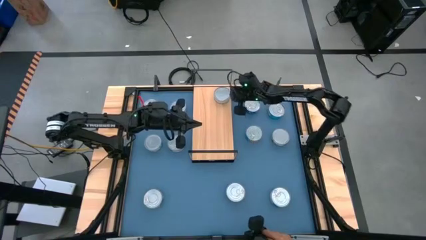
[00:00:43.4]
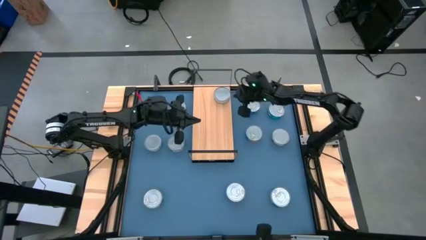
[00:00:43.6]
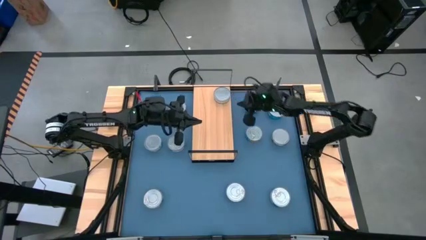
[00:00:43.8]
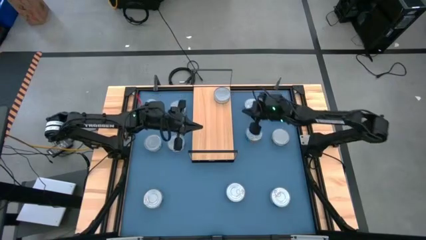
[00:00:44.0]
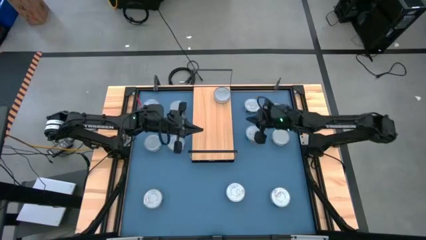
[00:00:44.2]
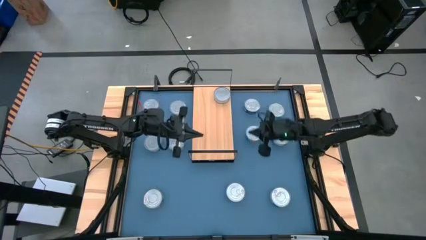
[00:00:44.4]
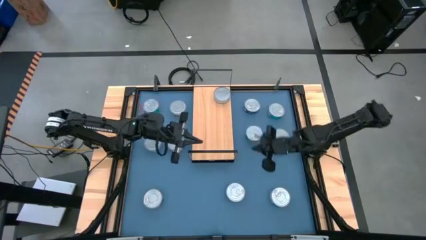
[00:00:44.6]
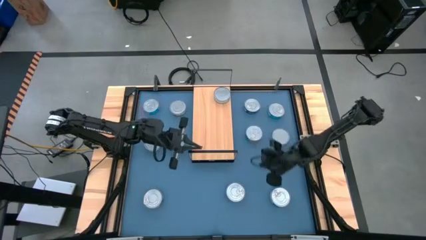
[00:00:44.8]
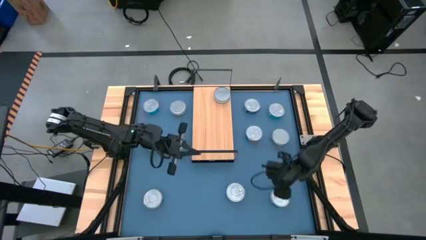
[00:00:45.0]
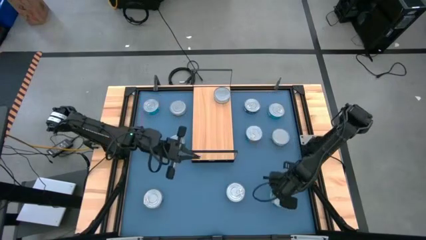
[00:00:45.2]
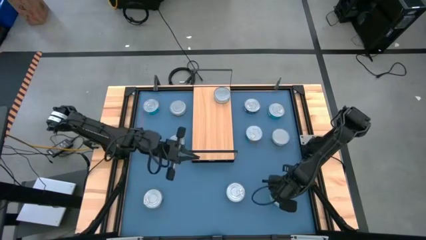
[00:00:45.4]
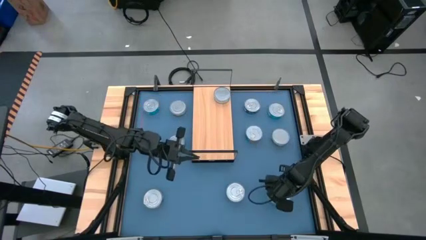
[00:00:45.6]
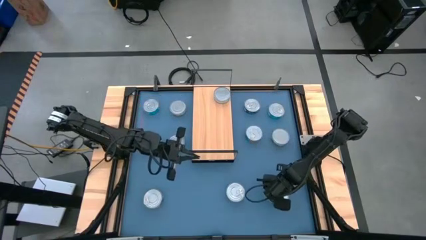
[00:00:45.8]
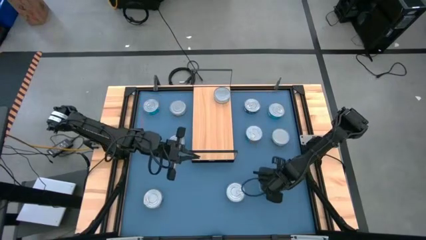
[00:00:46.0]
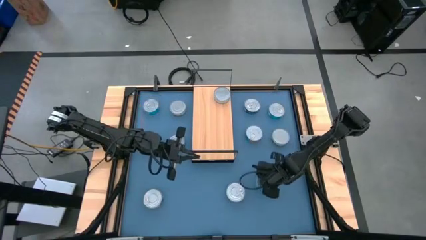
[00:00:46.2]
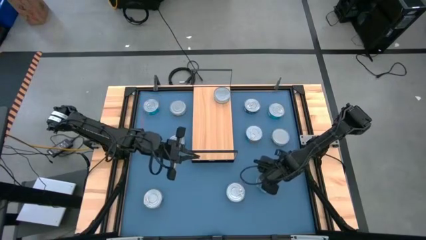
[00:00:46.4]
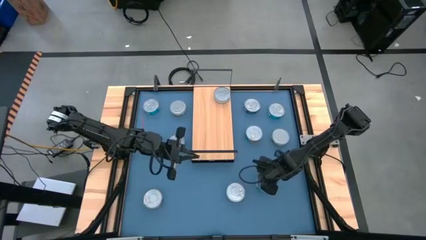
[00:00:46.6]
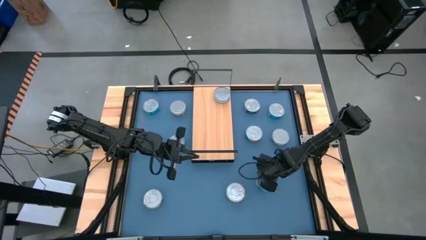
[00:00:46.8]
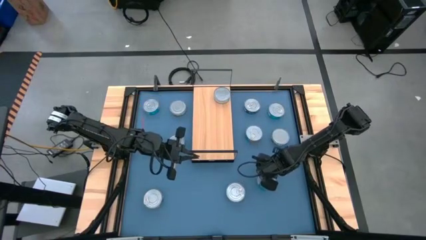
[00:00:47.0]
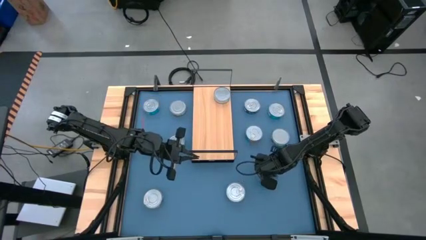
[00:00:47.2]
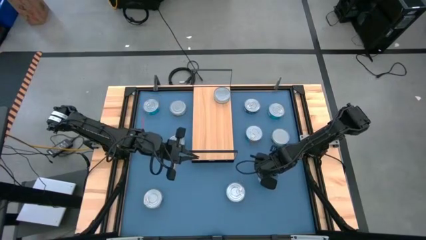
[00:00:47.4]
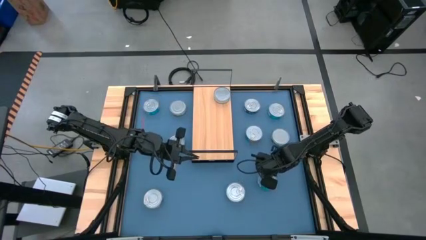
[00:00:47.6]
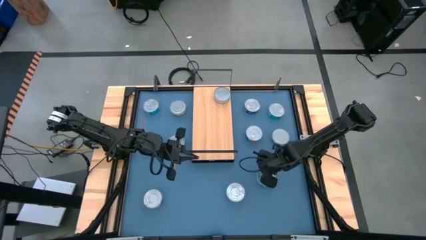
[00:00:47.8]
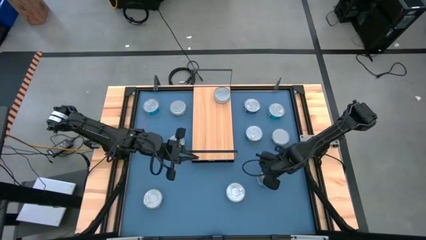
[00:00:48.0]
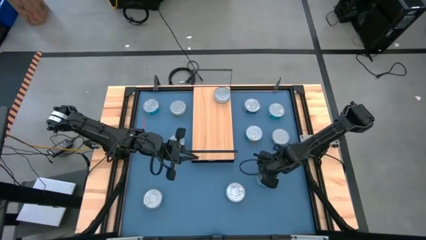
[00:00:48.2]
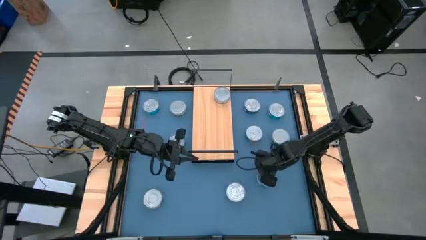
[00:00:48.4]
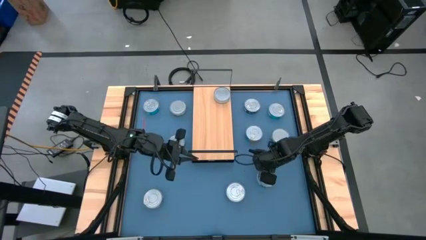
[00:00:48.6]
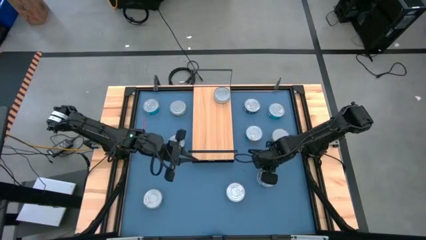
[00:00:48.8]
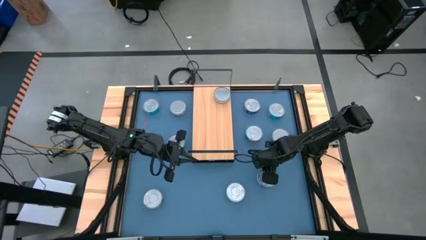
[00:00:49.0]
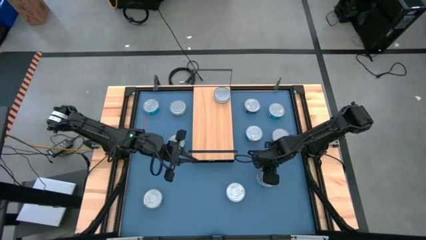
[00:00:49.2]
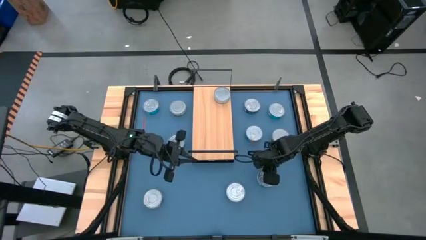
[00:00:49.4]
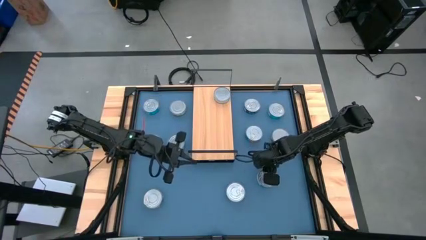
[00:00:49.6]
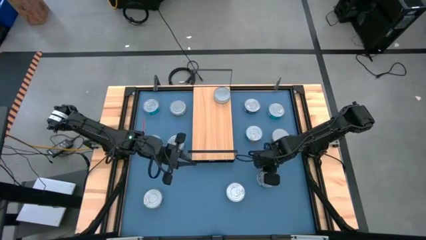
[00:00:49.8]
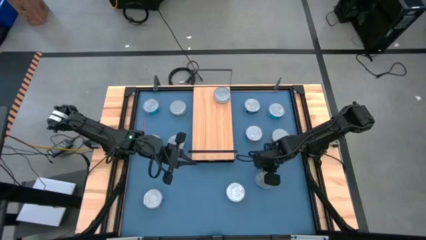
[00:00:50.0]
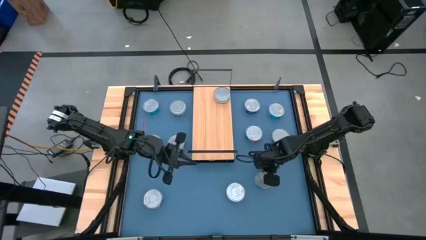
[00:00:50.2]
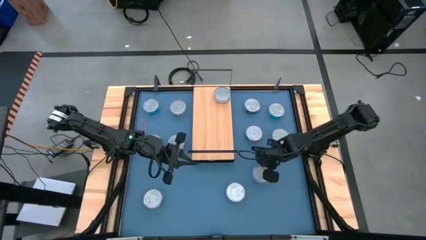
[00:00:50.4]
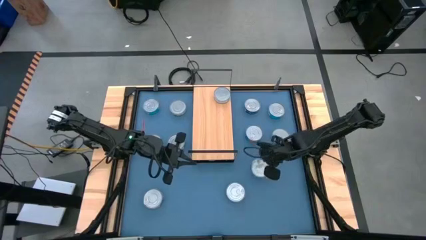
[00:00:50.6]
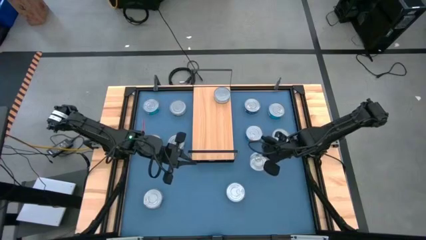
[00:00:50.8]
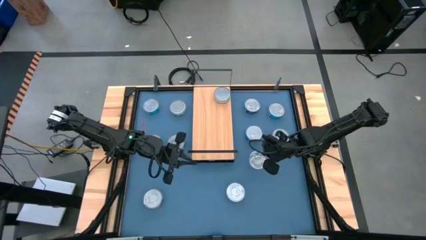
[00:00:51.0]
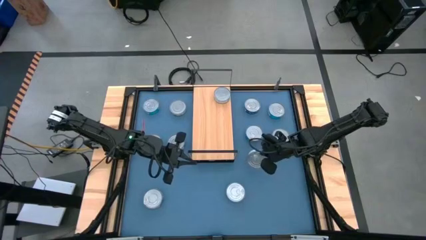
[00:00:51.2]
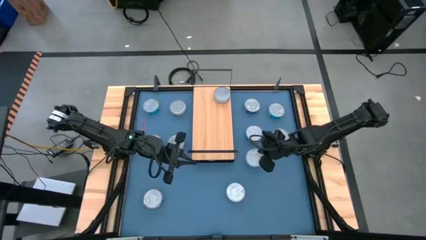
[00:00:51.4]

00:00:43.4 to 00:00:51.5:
Task: Stack canned seafood by type on shelf
Put the yellow-blue tuna can on the shelf

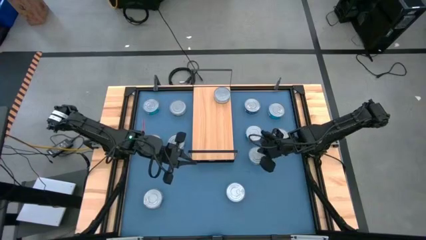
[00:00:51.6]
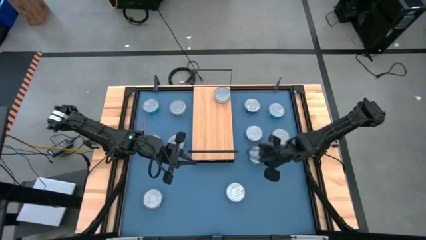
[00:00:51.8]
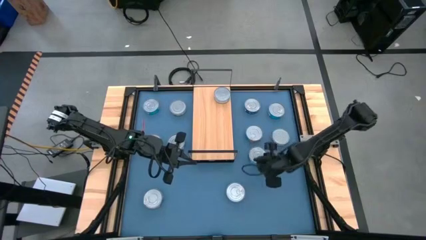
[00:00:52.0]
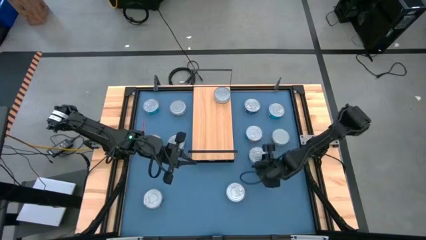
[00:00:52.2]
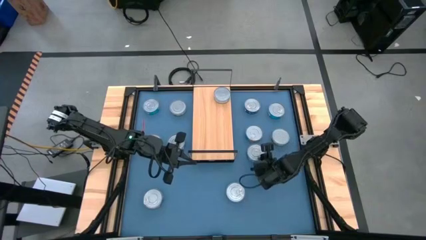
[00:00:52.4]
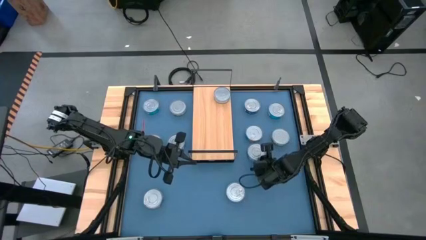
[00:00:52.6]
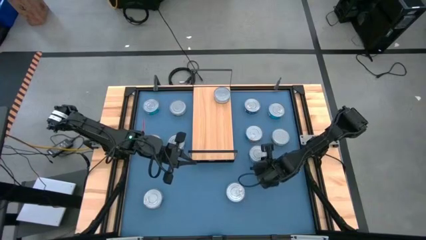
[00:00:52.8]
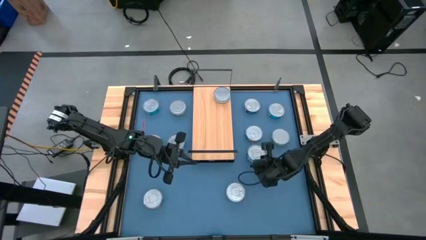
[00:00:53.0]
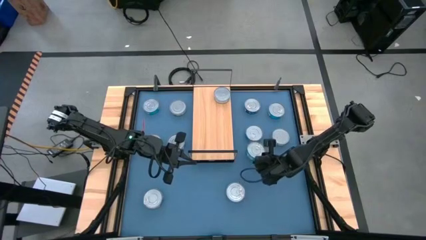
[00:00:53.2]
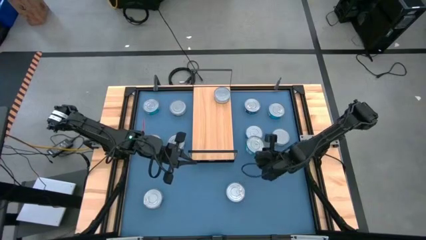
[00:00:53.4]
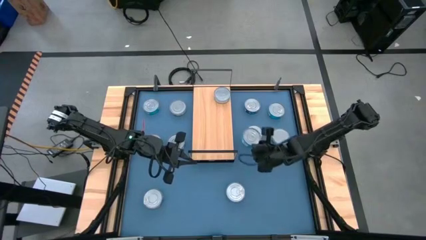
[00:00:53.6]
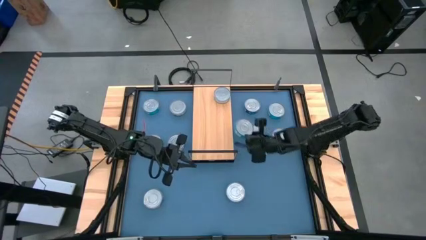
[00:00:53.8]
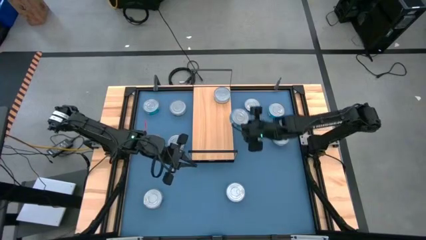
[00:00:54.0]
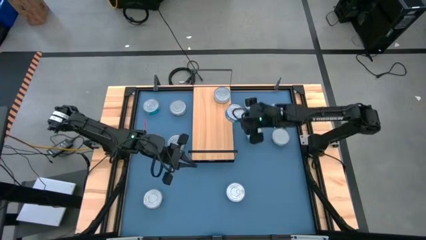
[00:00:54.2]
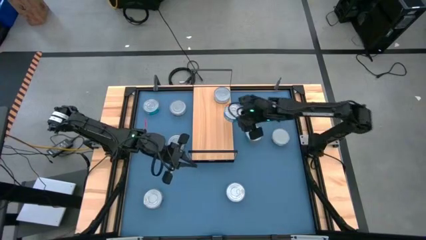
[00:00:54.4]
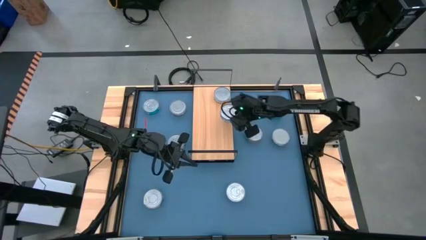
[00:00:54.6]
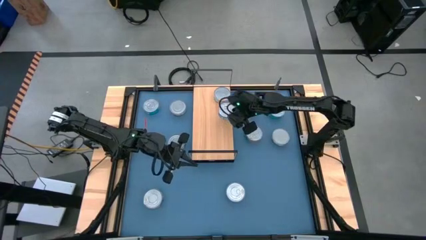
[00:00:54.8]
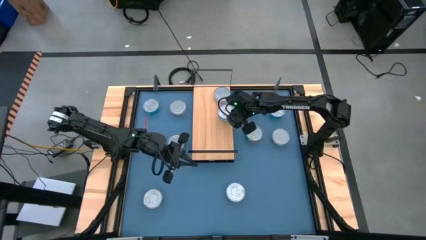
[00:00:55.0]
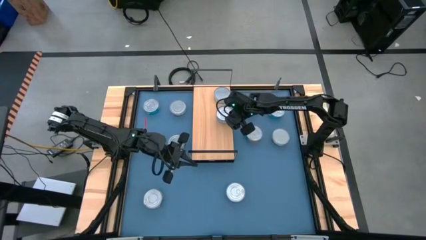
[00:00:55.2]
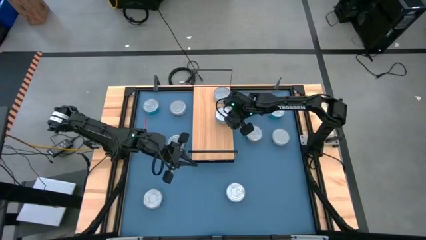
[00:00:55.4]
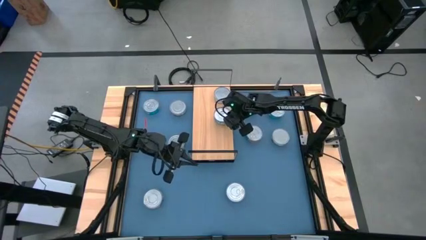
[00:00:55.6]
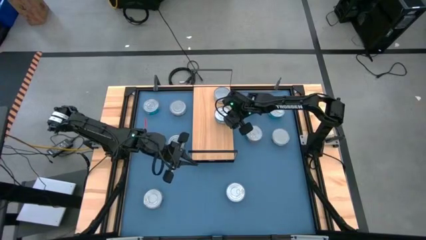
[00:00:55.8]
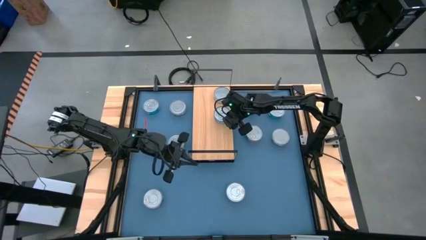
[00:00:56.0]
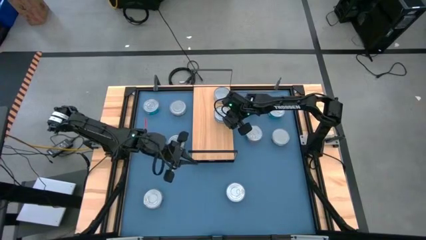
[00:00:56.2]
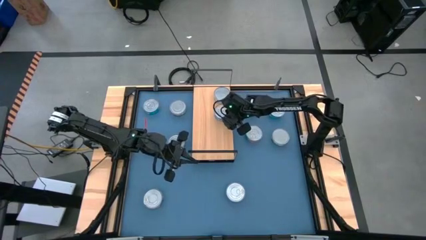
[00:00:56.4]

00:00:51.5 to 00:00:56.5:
Put the yellow-blue tuna can on the shelf

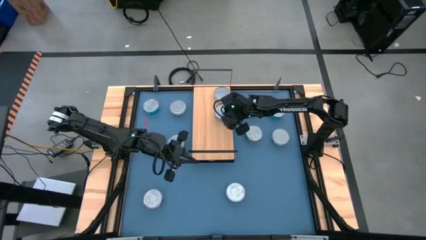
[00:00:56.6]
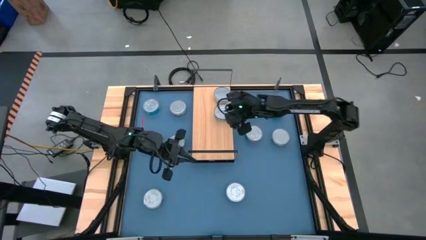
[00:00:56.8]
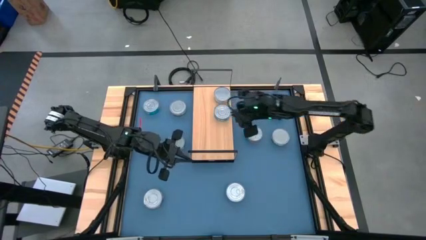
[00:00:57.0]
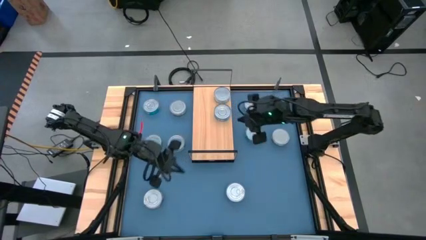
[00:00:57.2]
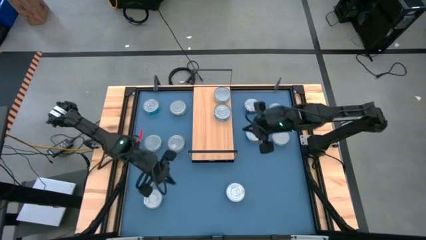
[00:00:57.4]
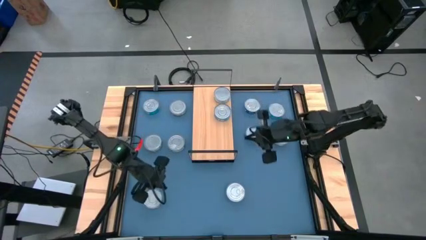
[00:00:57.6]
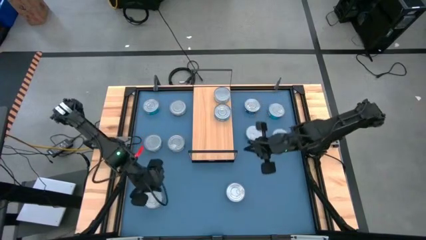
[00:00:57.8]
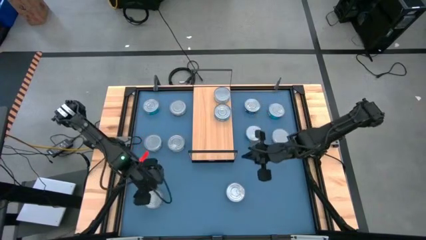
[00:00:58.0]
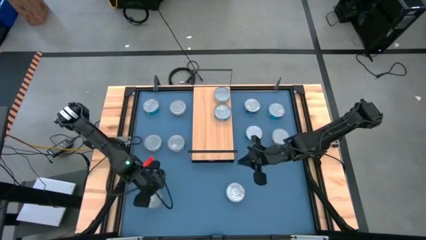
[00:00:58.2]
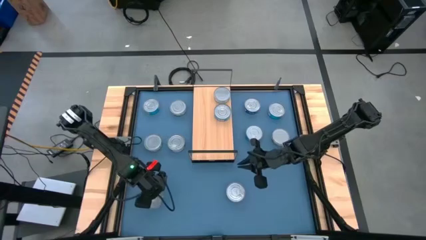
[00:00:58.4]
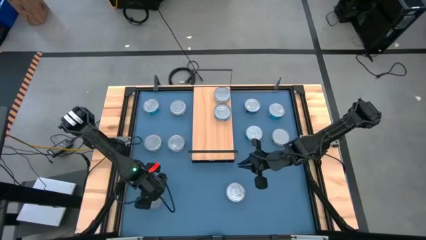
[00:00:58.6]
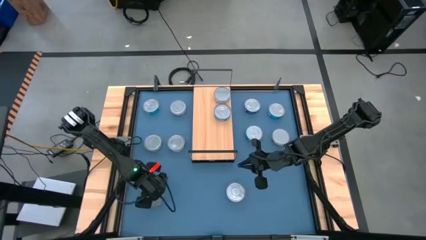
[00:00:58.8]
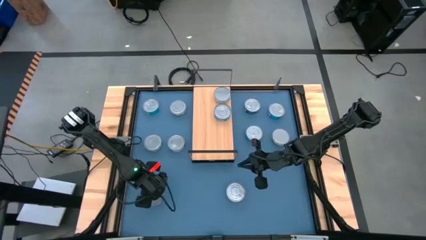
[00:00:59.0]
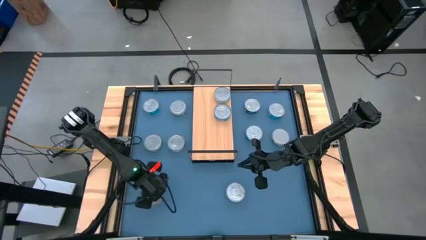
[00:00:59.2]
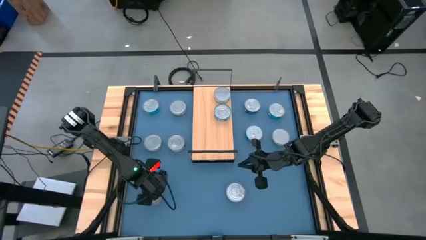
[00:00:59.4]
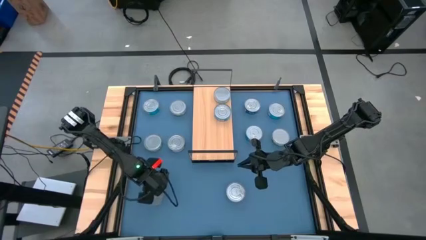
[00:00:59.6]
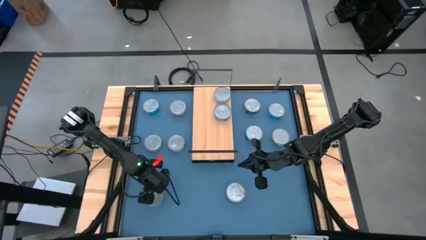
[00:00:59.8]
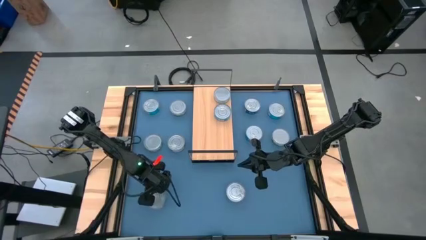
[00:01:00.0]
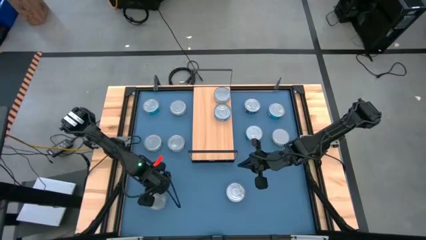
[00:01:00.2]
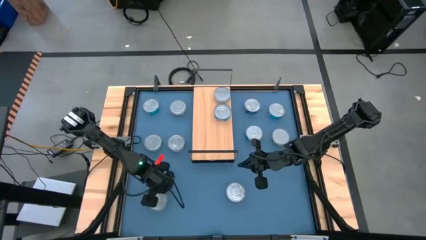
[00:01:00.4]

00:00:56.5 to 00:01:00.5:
Put the blue tuna can on the shelf
